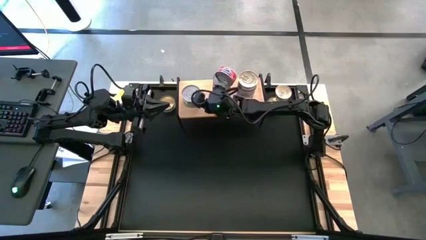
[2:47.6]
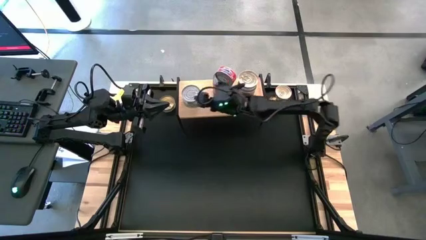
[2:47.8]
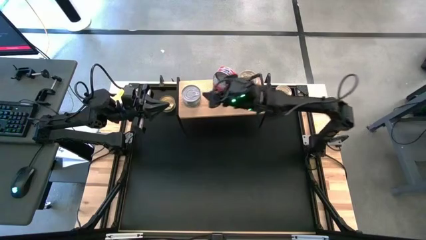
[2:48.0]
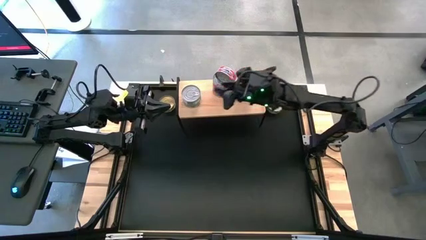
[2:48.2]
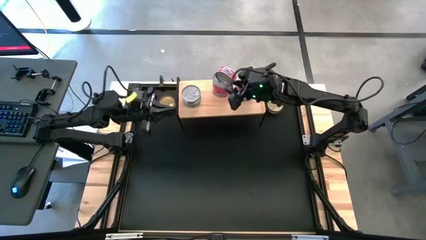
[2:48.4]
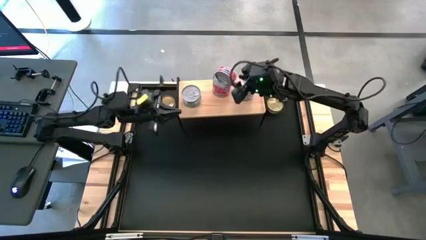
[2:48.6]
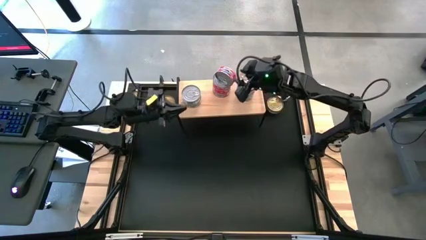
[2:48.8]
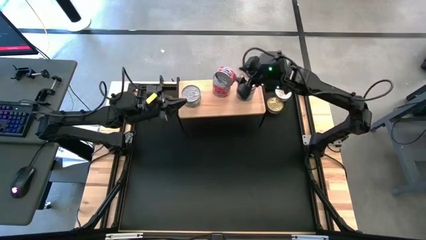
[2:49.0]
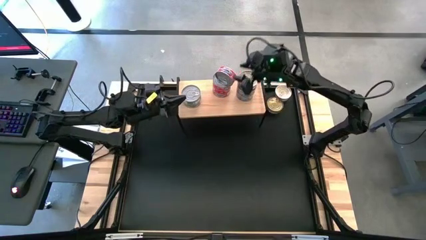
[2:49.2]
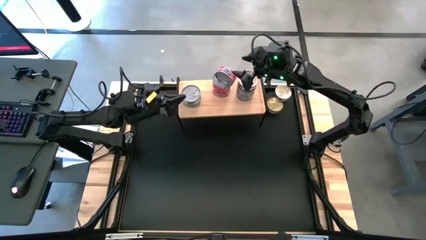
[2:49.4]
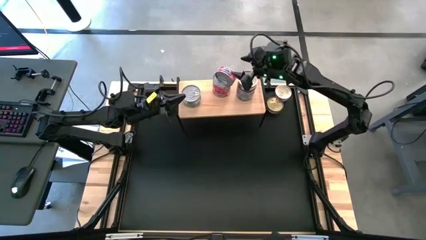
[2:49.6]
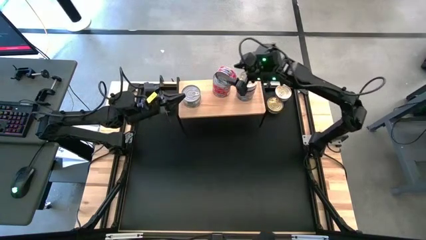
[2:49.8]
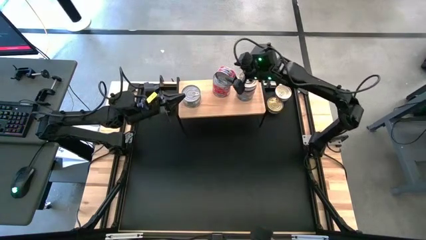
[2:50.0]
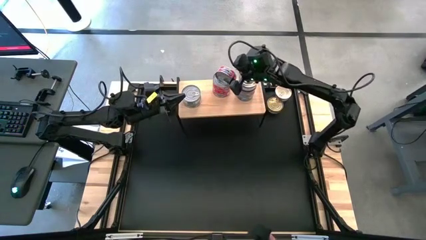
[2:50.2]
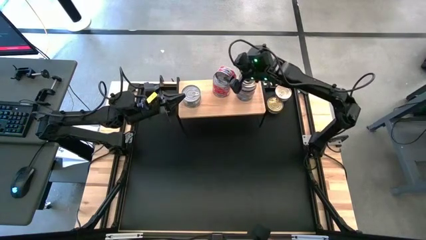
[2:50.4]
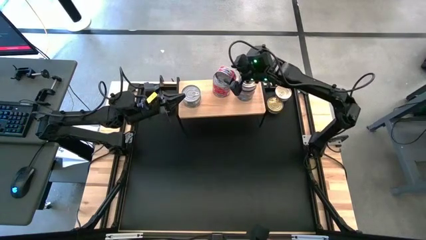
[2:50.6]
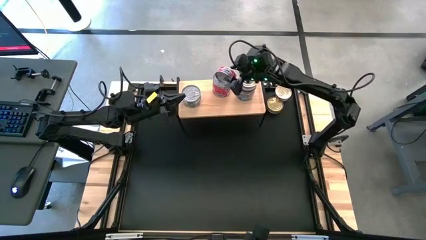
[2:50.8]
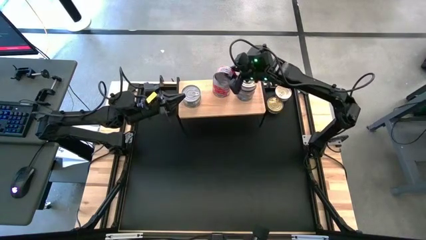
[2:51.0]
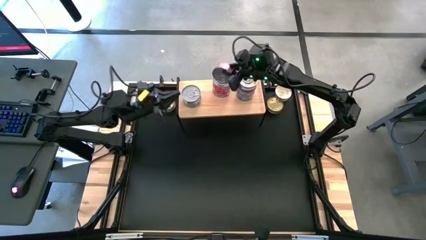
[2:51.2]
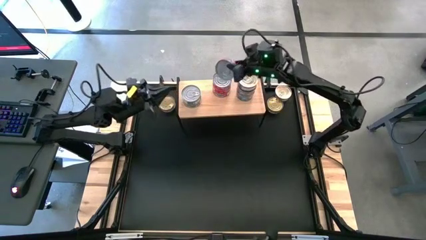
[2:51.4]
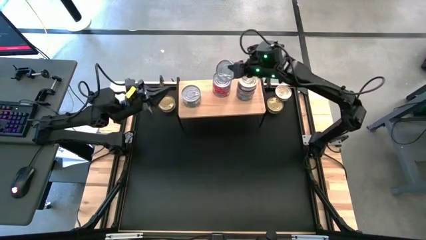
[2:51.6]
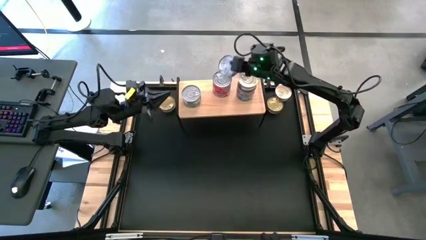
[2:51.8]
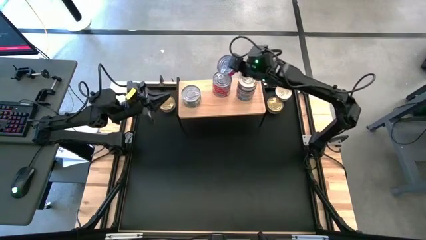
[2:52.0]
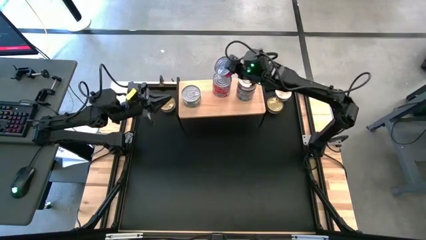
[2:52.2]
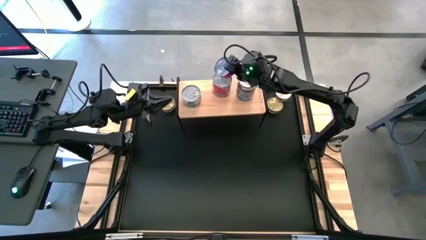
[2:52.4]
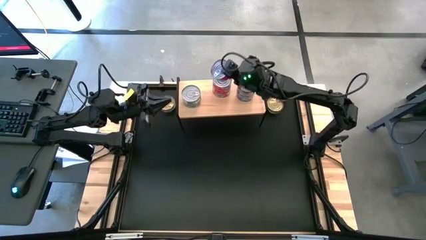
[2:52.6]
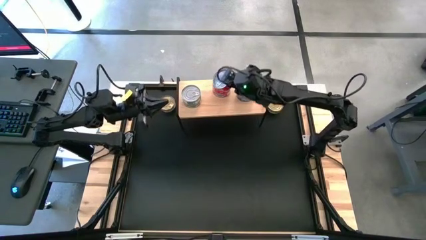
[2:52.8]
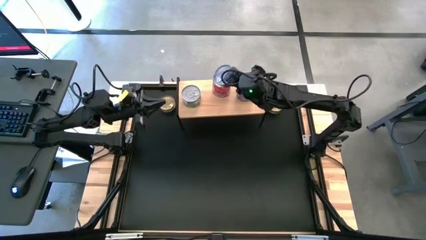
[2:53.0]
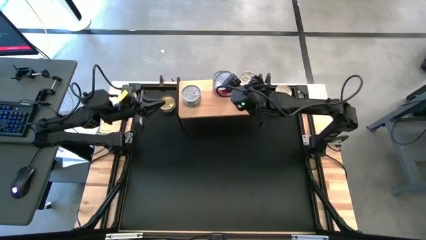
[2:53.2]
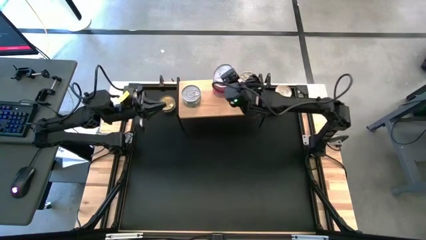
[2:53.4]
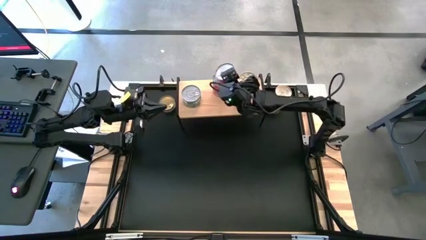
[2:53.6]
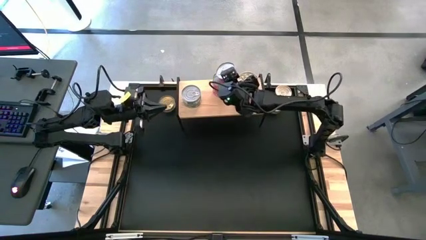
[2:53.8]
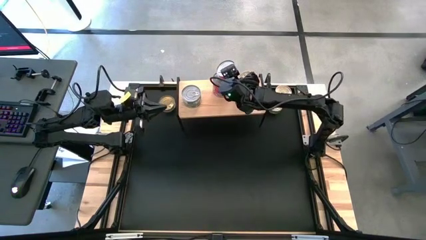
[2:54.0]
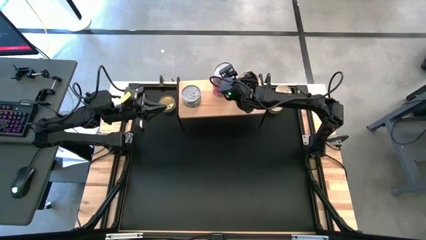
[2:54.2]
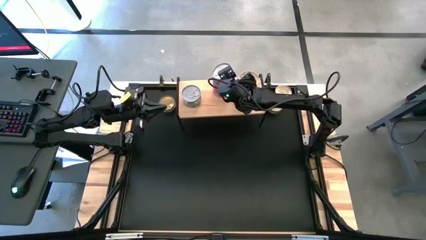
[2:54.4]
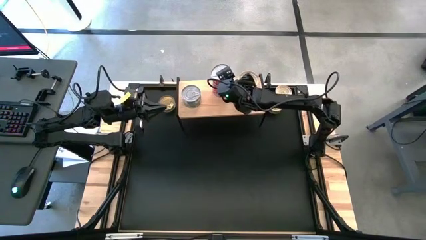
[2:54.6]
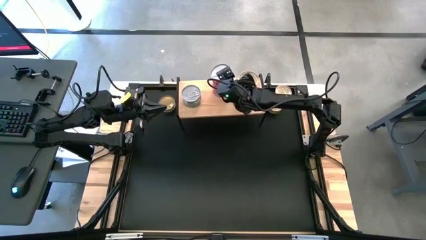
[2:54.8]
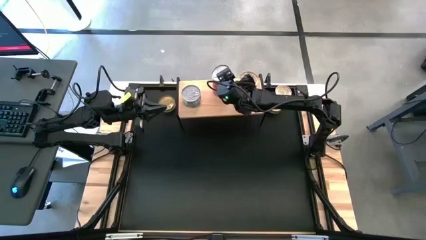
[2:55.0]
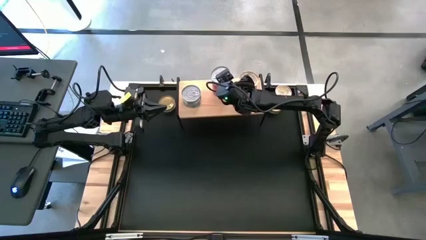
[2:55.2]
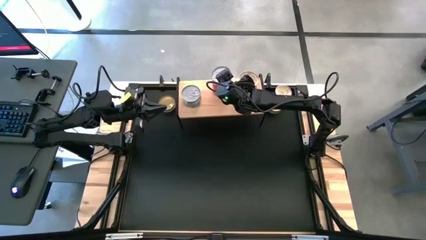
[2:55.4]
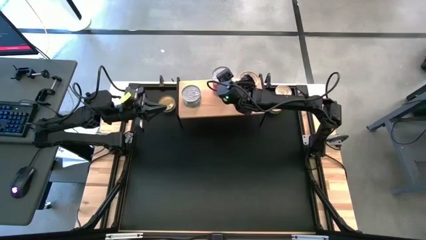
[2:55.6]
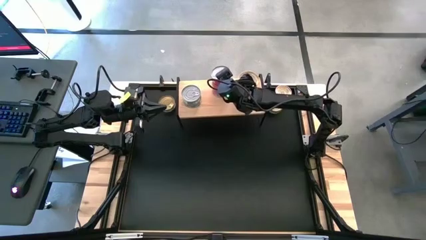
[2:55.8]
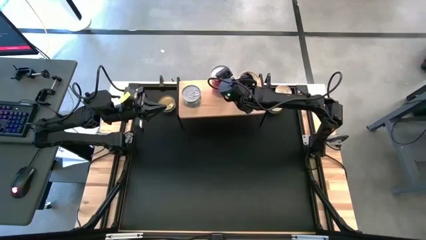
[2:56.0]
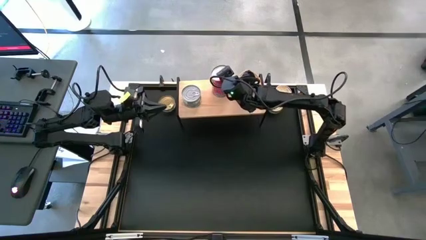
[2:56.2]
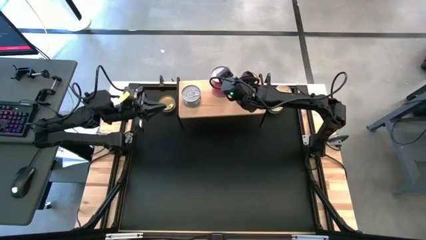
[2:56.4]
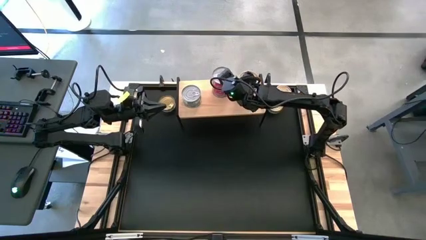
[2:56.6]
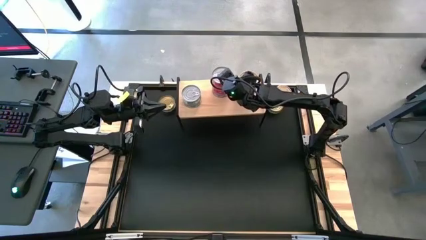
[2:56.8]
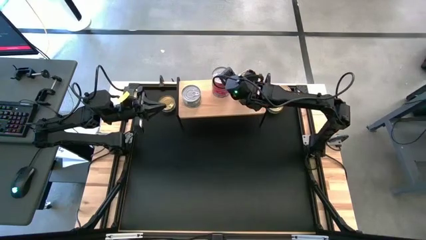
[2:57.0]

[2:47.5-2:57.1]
Task: Stack canned seafood by type on shelf
Adjust the red tuna can

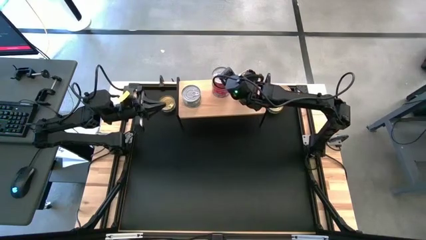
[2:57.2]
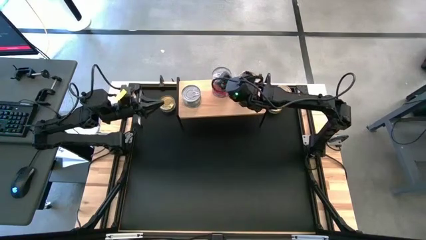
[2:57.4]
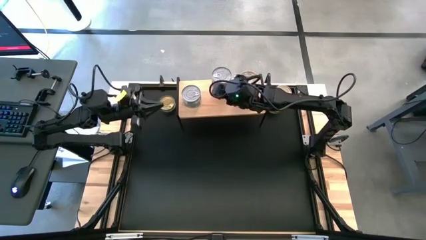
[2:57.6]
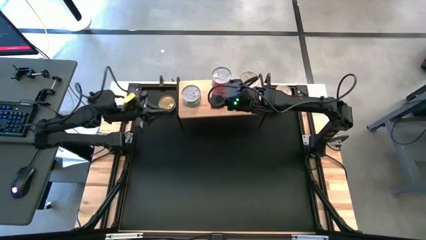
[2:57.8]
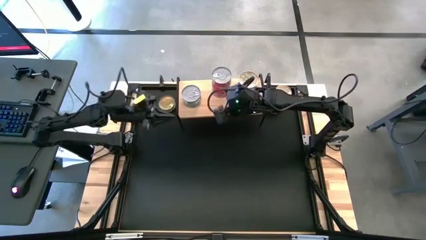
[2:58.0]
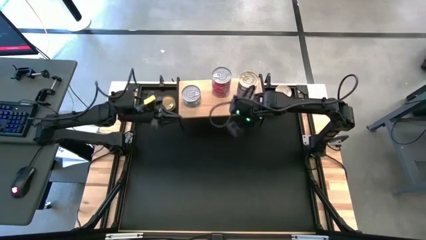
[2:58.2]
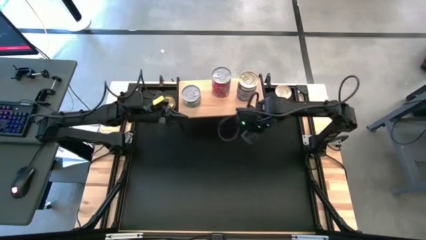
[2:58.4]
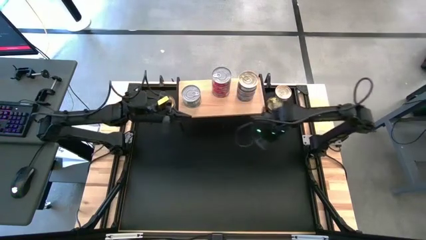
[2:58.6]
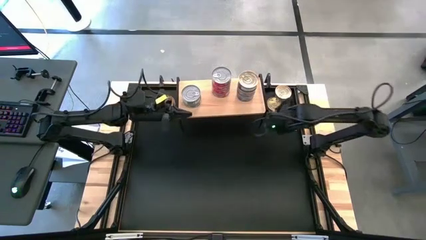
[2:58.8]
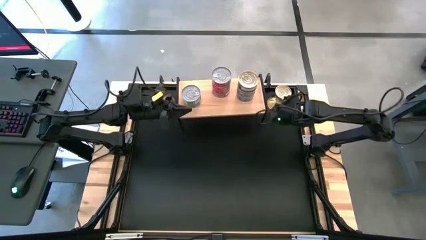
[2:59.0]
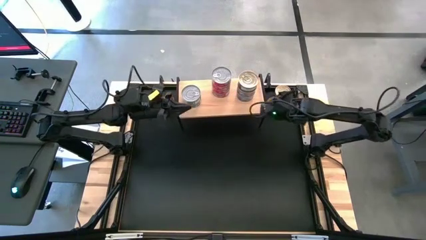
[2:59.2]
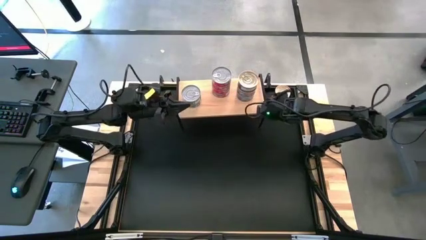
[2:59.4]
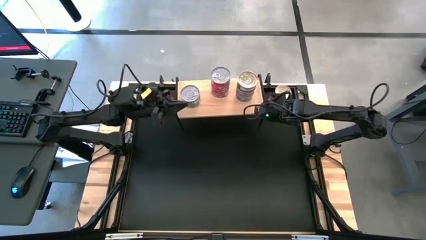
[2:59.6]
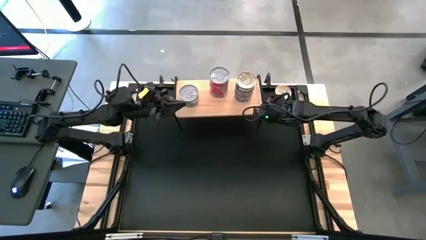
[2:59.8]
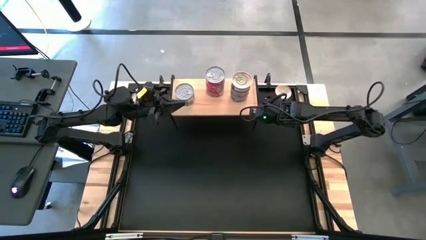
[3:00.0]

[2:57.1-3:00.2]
Adjust the shelf
